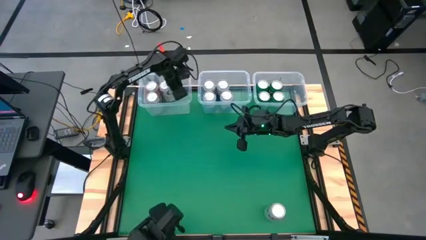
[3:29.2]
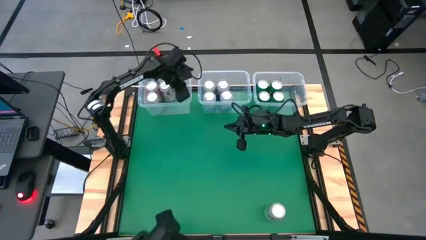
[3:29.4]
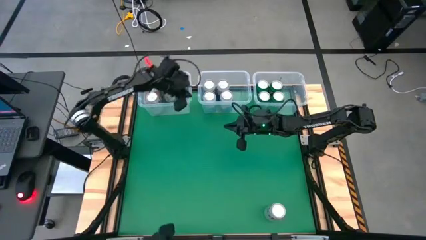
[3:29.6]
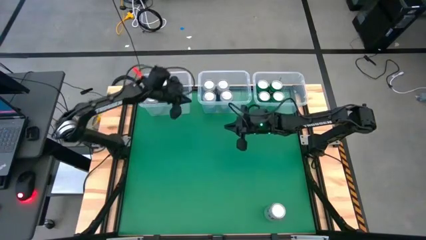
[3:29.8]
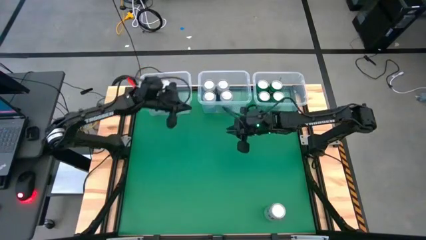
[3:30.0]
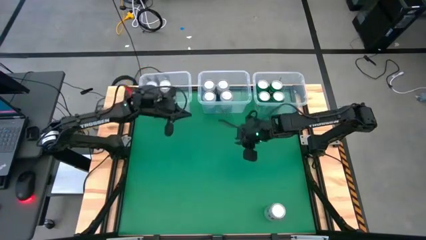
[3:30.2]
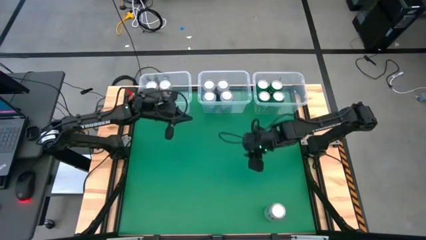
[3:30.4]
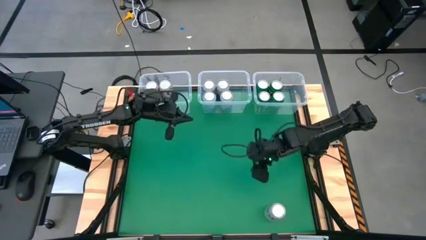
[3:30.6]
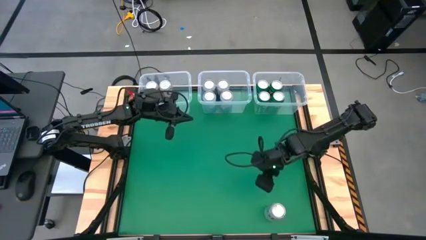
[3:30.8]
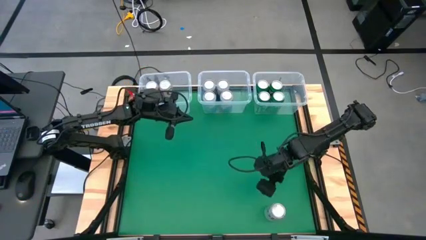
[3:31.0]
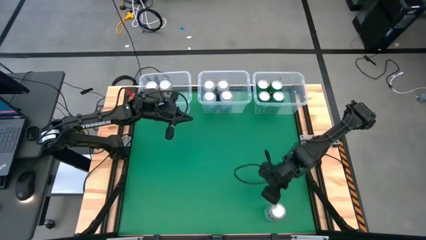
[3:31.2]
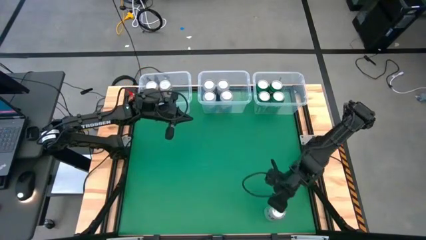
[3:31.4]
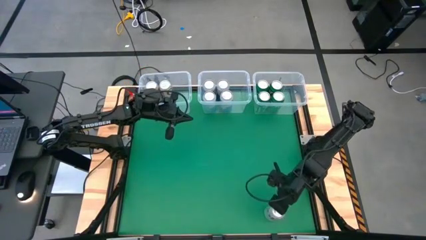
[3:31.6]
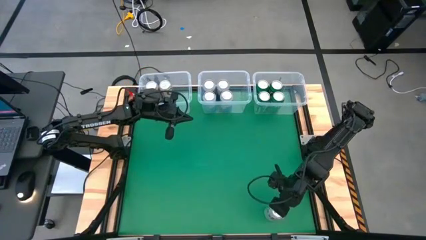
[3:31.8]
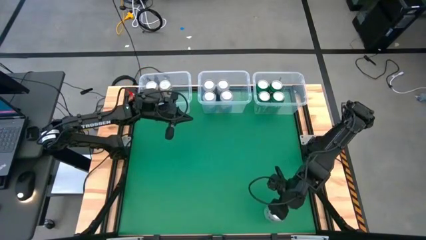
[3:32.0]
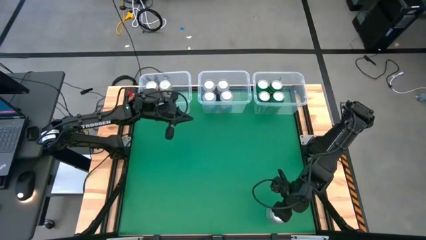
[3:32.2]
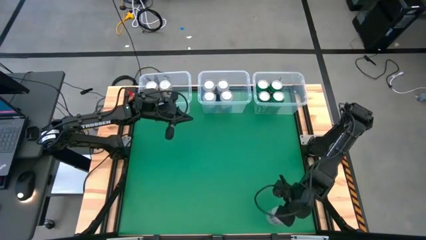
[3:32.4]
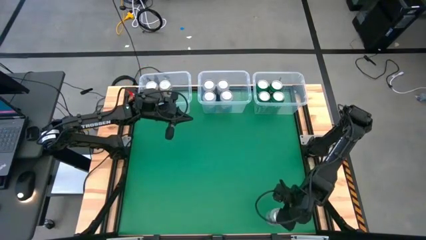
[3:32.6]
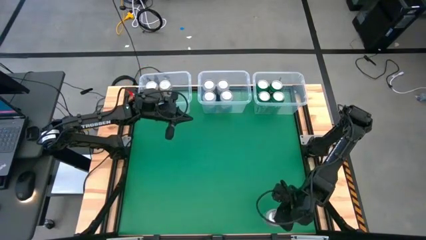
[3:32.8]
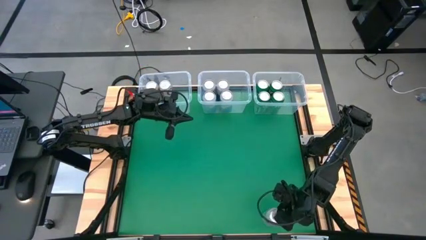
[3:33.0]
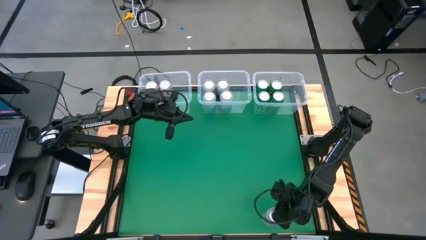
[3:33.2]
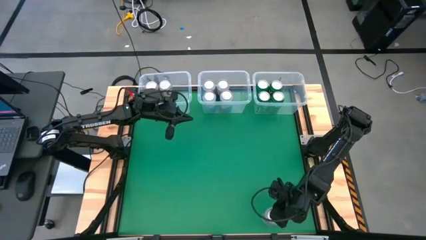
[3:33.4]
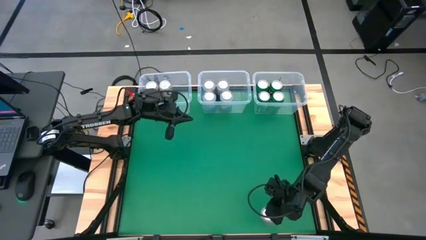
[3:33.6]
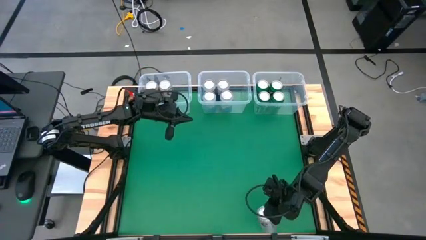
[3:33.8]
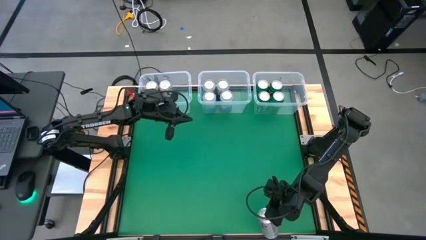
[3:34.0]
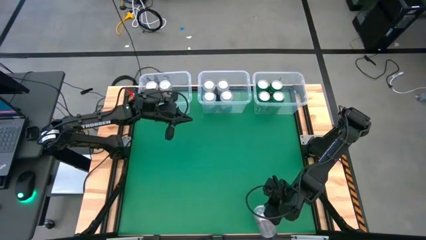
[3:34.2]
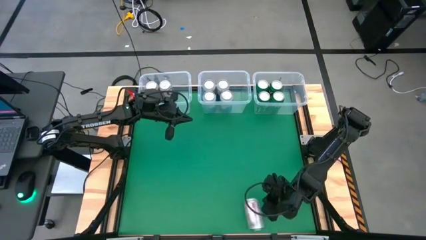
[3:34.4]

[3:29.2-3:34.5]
Task: Sort soda cans
Put the red silver soda can into the left transparent bin

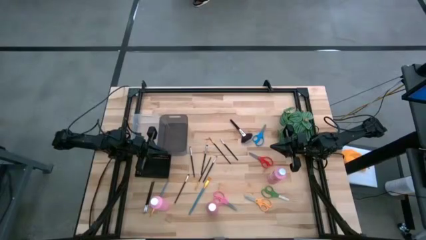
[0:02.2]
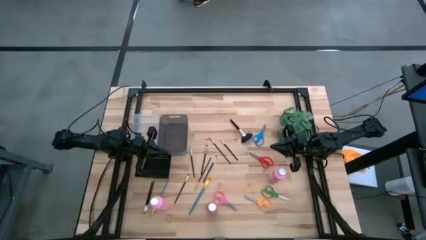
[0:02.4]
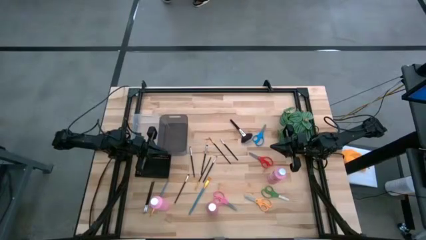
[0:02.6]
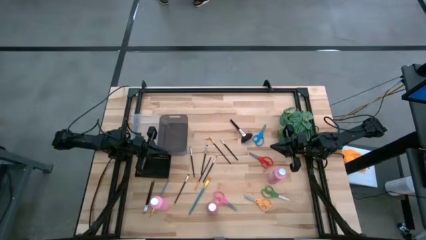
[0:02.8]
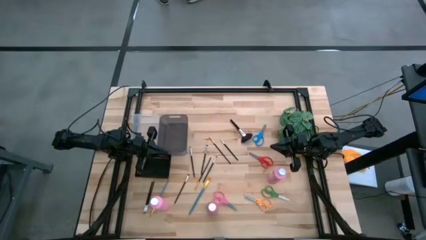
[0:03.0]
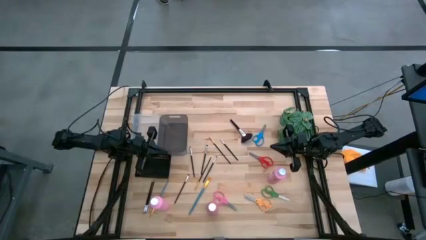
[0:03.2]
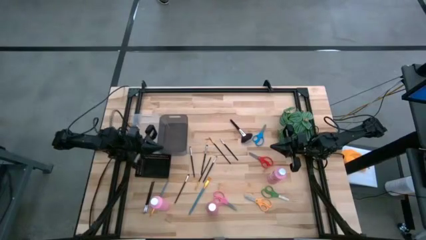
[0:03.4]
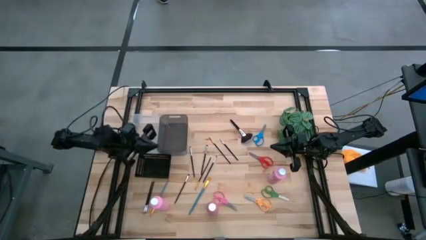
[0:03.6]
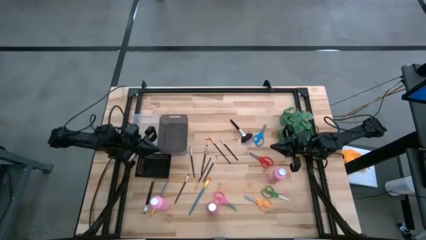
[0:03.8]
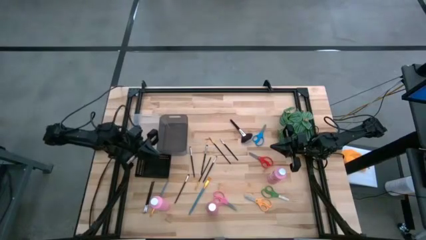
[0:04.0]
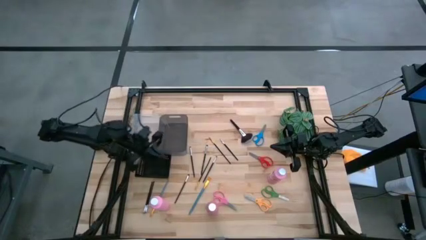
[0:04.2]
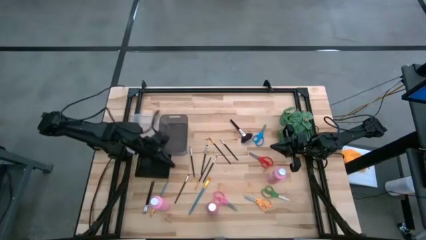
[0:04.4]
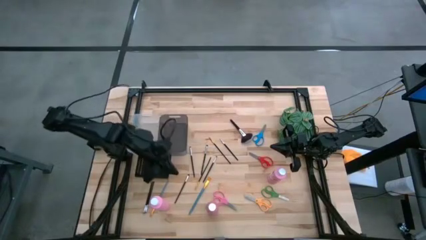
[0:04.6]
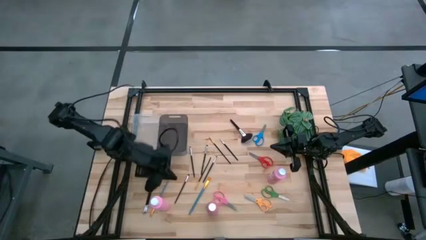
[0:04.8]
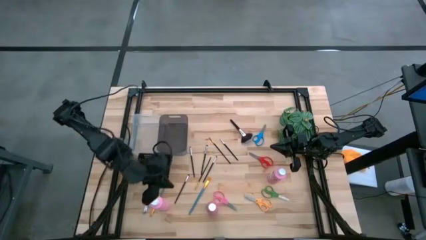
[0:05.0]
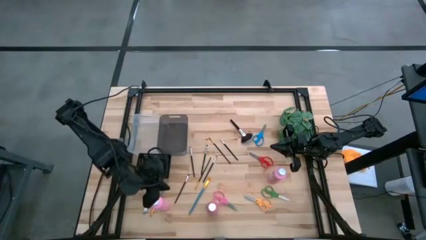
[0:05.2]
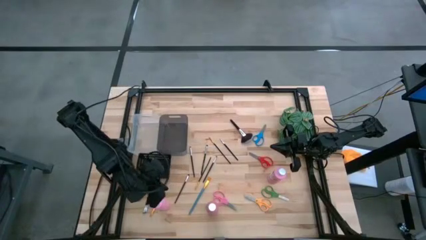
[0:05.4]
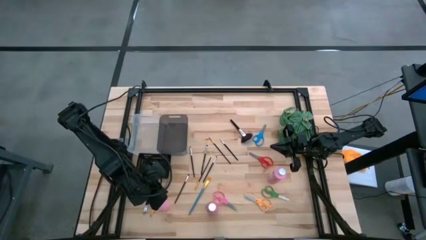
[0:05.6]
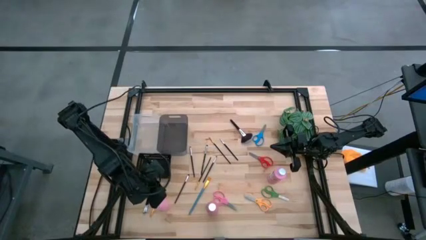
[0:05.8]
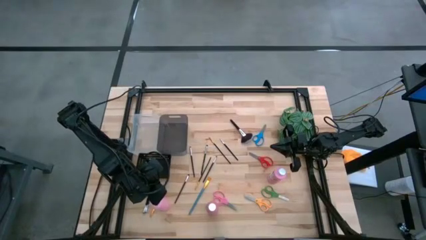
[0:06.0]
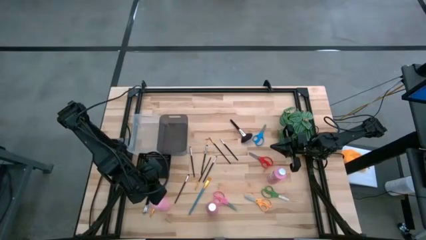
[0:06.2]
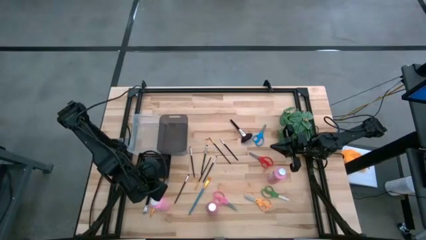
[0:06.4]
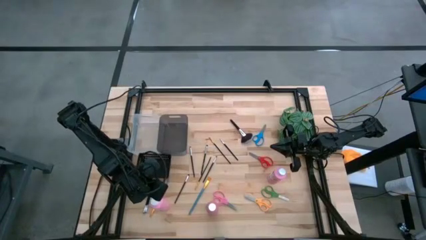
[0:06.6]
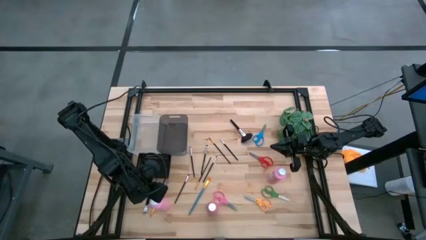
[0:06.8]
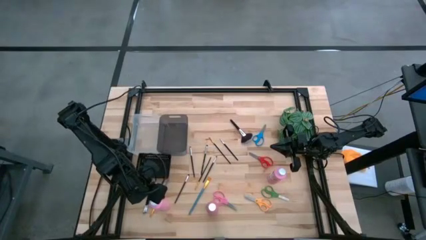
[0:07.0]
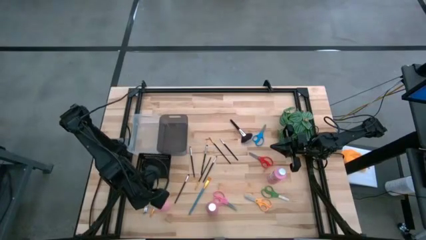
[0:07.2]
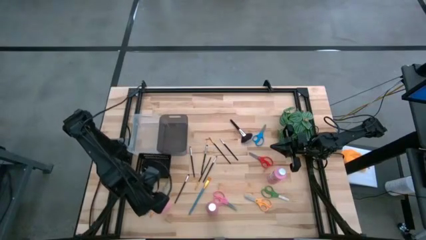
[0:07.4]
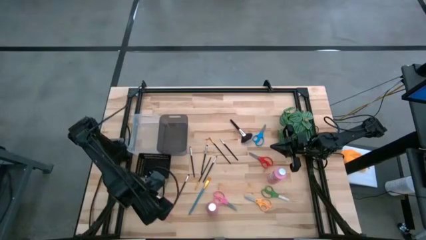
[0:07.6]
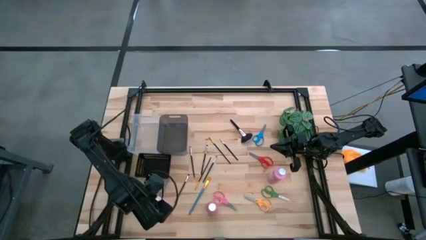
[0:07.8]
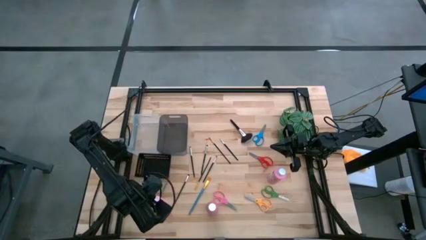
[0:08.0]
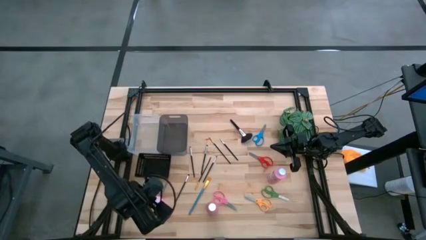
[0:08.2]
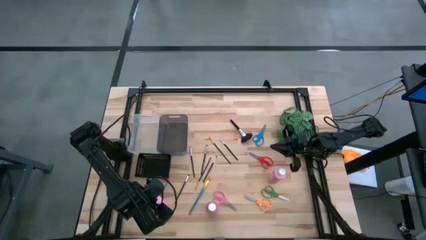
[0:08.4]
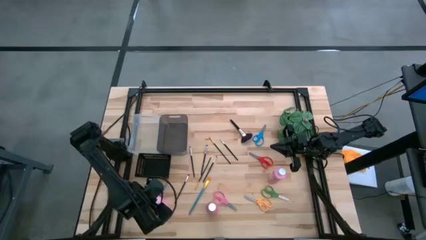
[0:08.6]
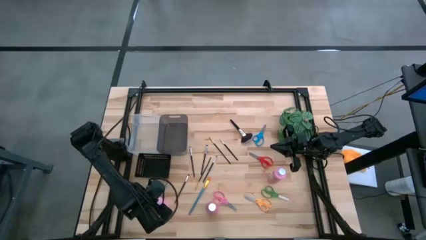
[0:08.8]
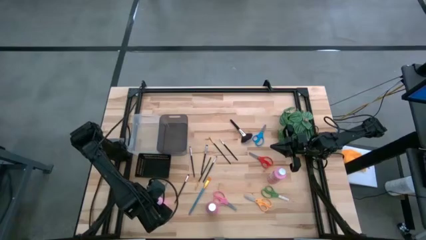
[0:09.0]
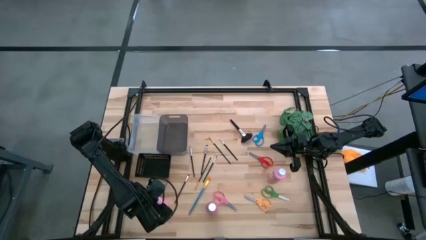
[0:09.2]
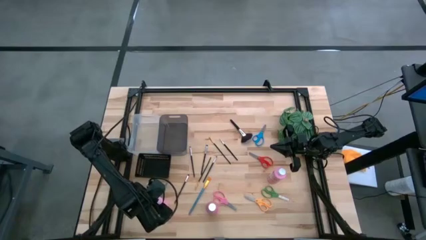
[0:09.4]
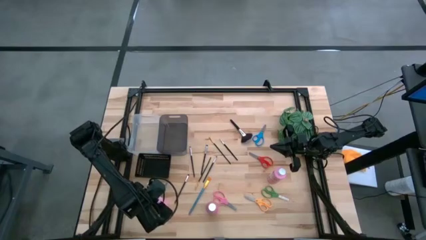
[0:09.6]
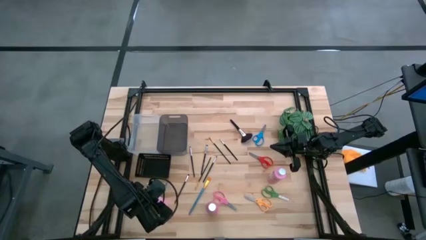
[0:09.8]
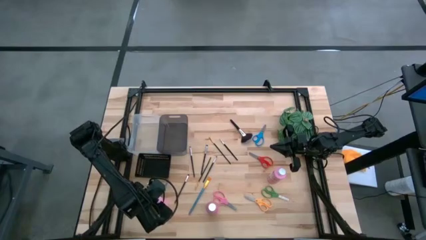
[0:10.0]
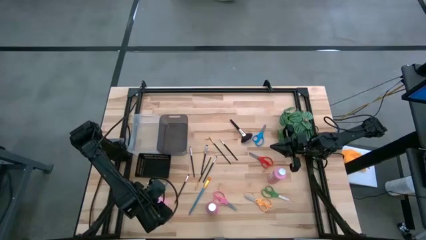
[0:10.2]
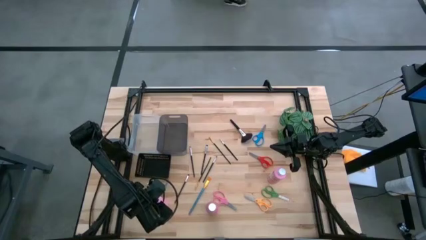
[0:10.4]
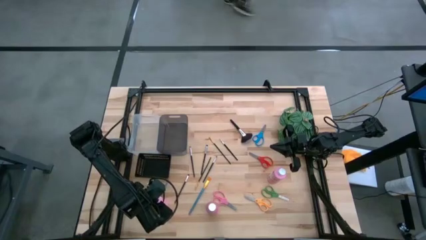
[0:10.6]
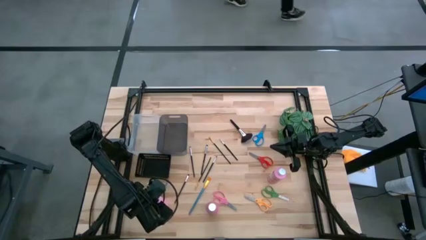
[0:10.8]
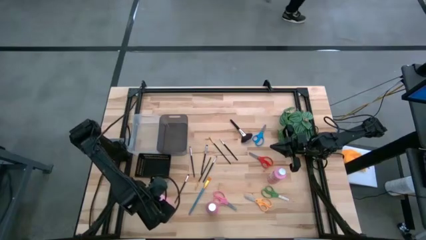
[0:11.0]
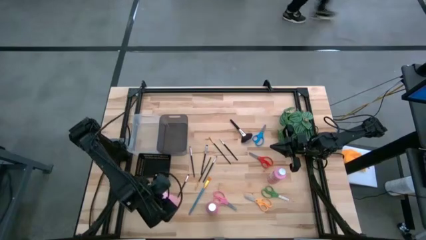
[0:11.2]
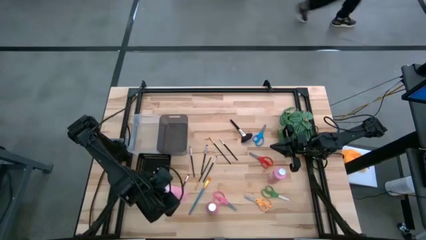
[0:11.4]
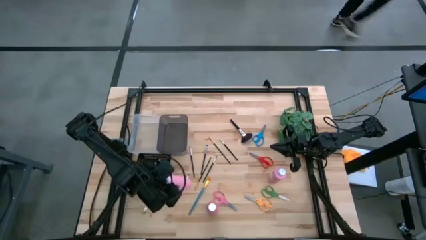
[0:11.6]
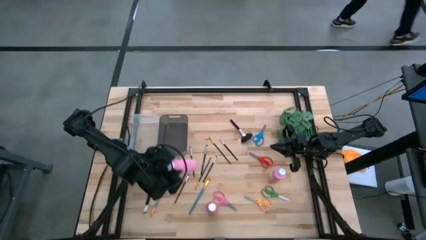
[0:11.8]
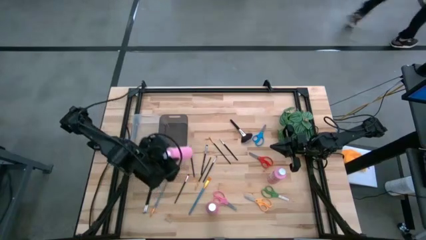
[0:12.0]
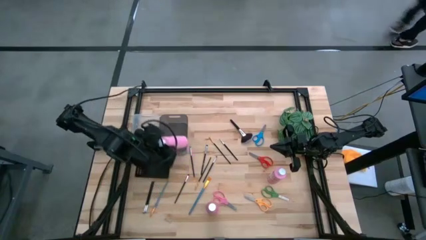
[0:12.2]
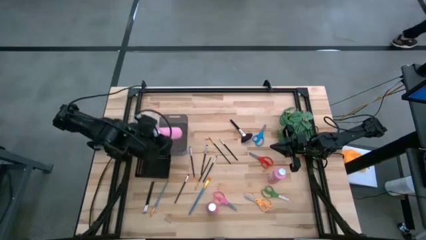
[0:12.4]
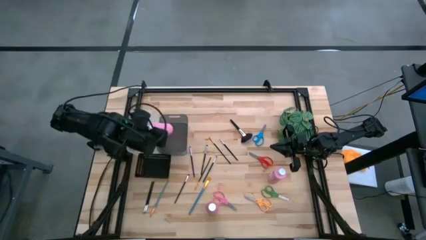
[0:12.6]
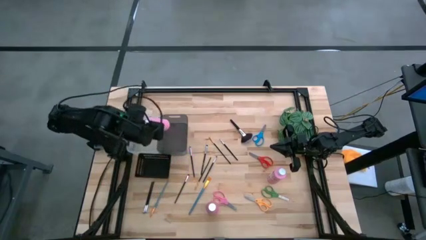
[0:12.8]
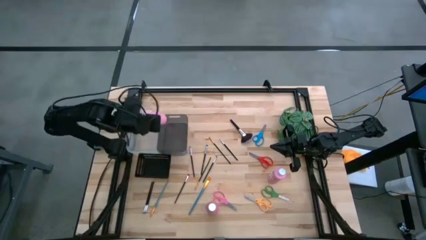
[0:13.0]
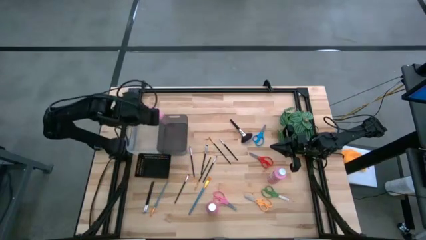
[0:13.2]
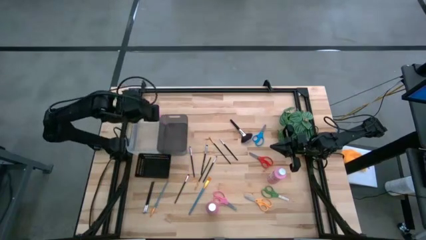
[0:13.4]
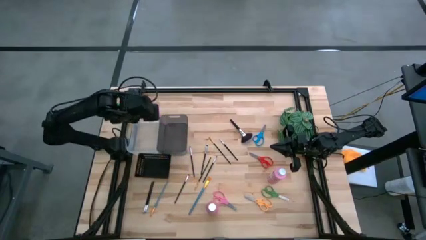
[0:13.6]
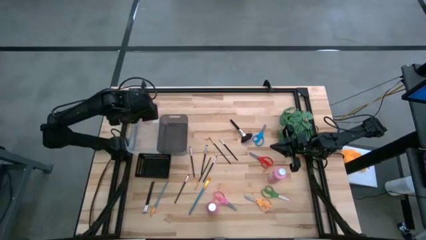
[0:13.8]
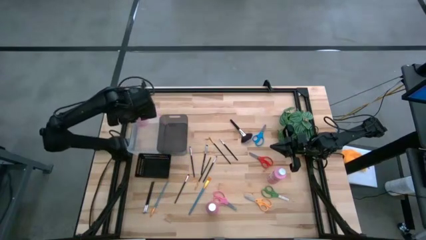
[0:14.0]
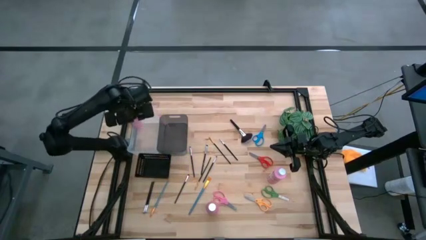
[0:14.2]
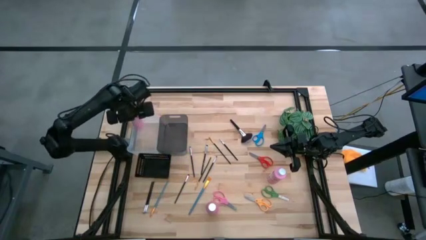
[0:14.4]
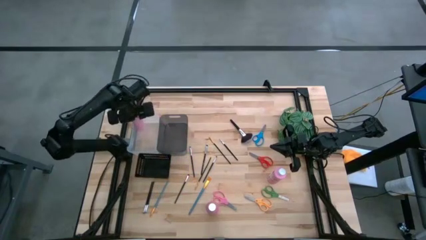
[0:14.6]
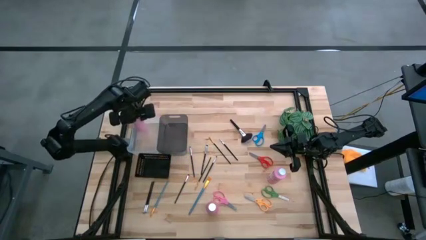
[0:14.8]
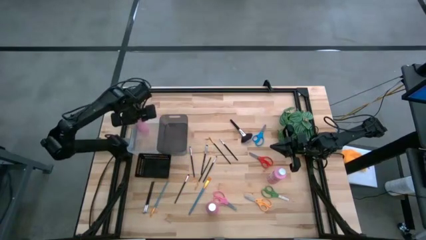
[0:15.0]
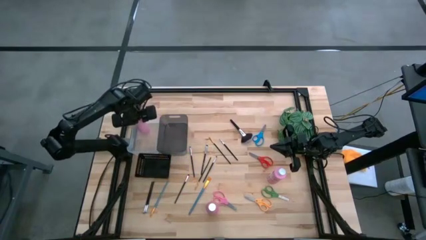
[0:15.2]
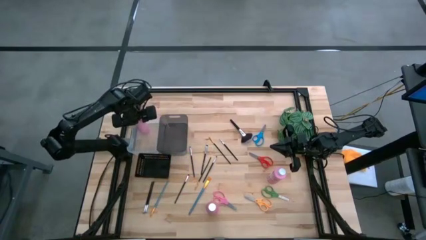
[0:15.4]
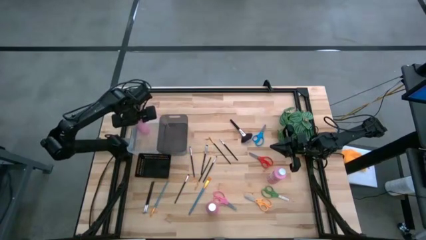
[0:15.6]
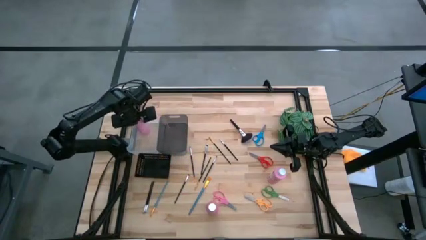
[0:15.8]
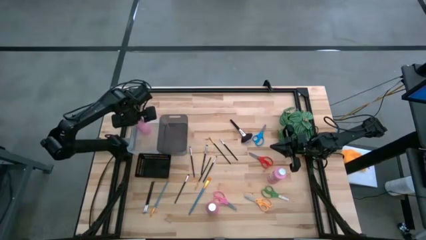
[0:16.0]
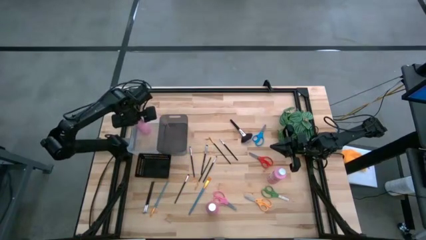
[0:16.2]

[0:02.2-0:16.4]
Task: Pick & Place Paint Supplies
Put the left light pink bottle into the white bin
